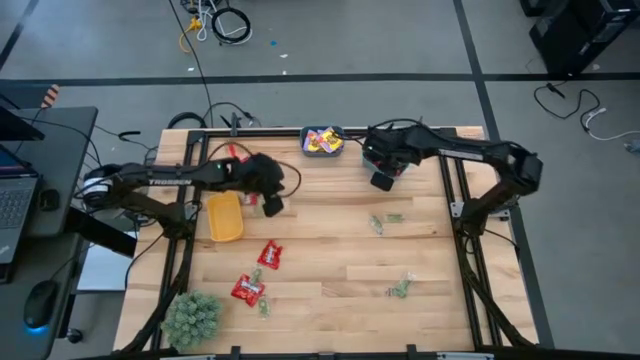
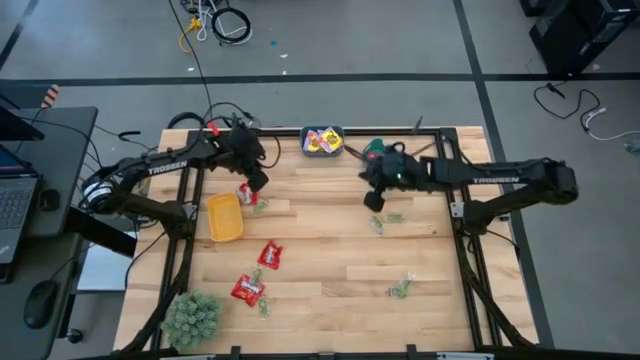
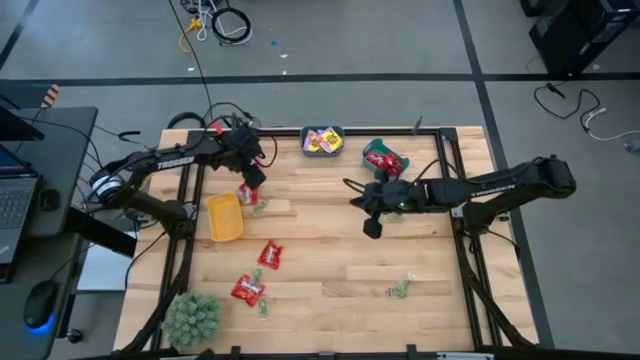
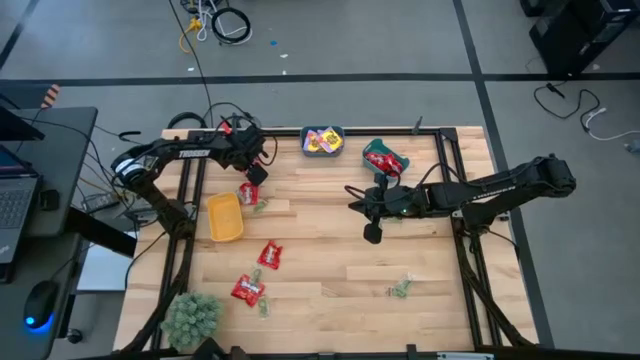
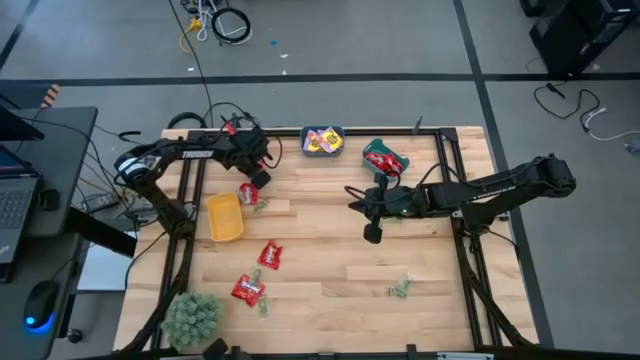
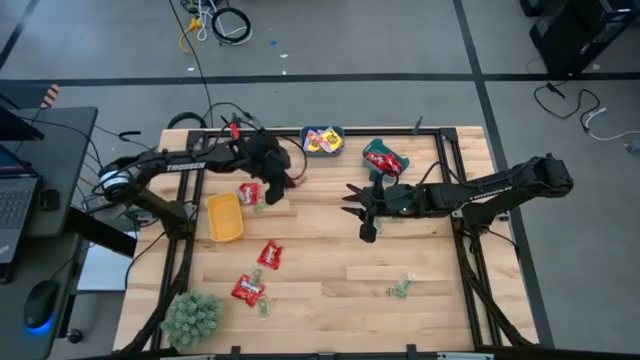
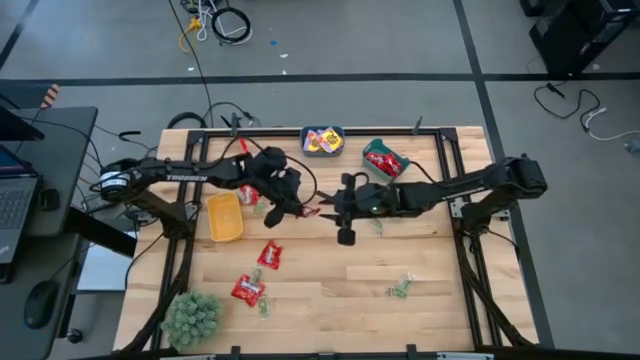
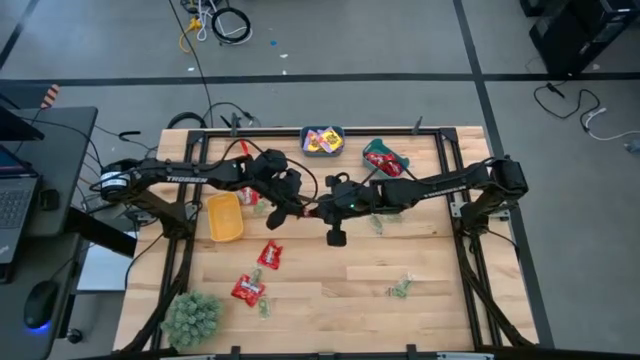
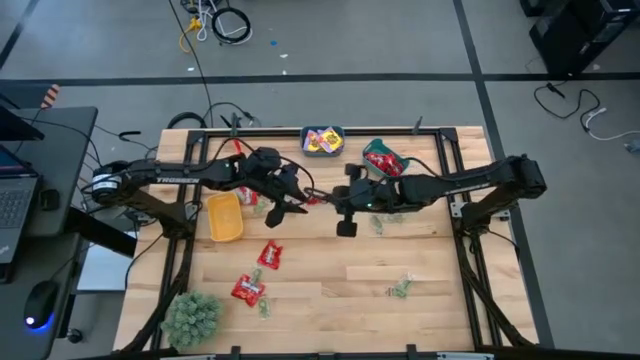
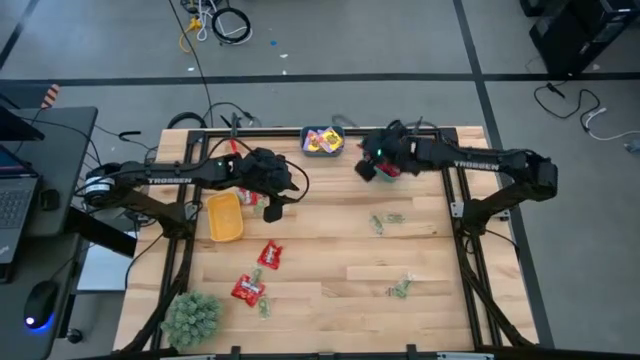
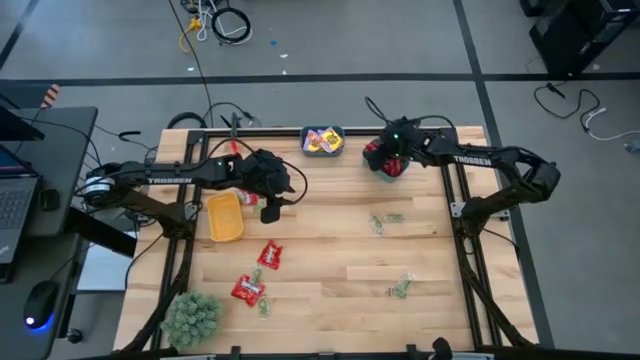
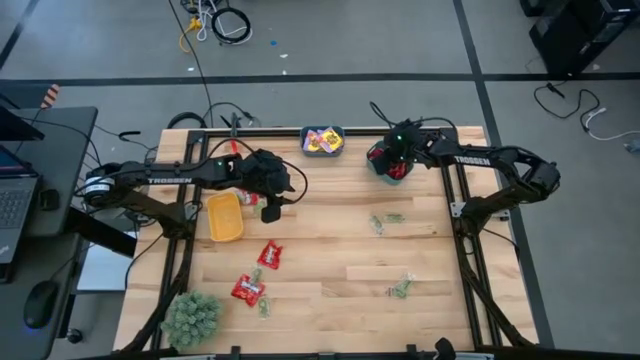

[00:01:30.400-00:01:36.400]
Task: Sort candy
Put the red candy into the green bin

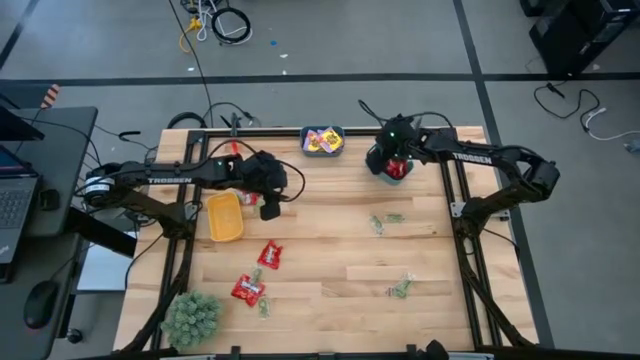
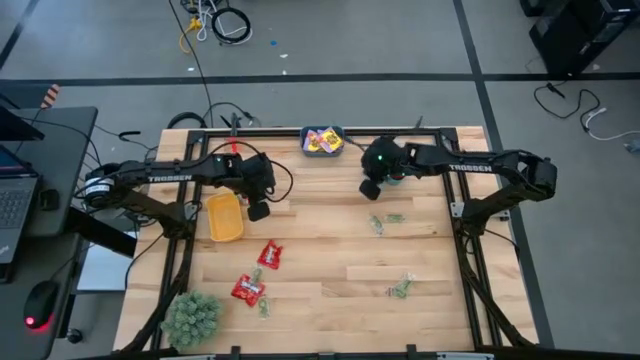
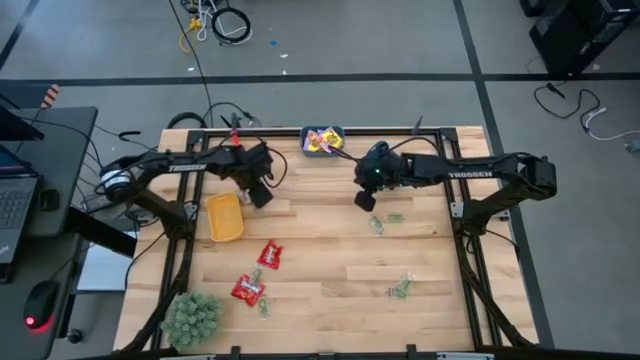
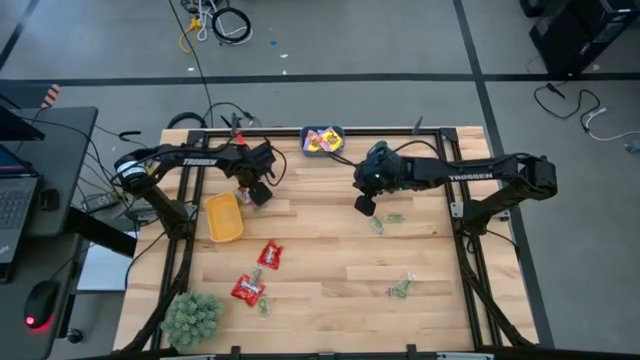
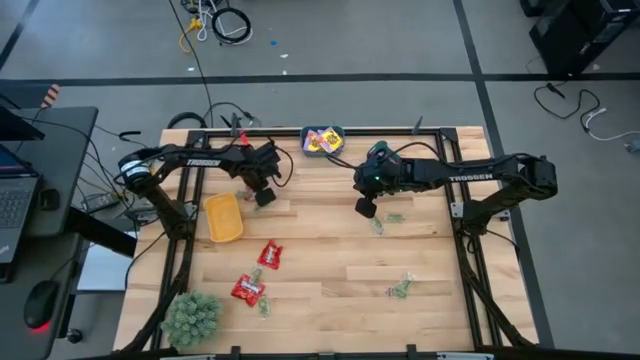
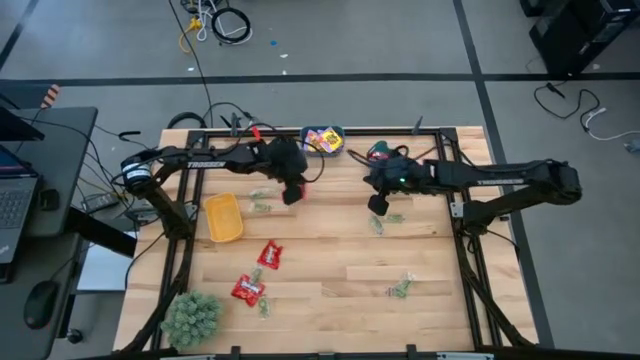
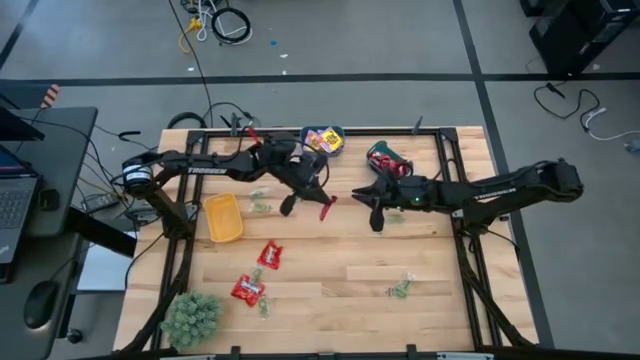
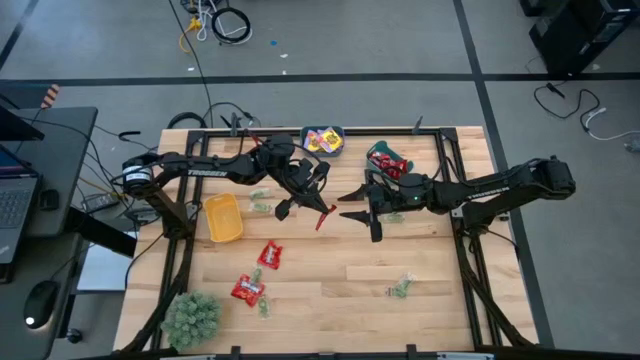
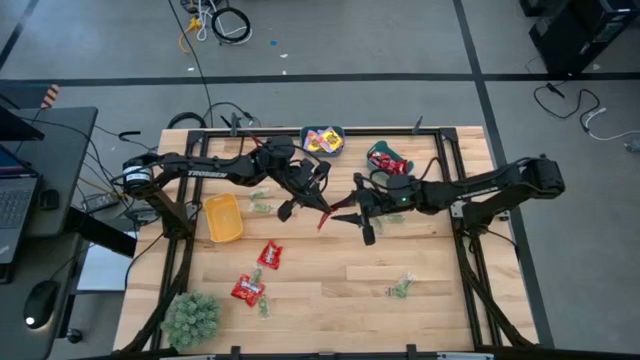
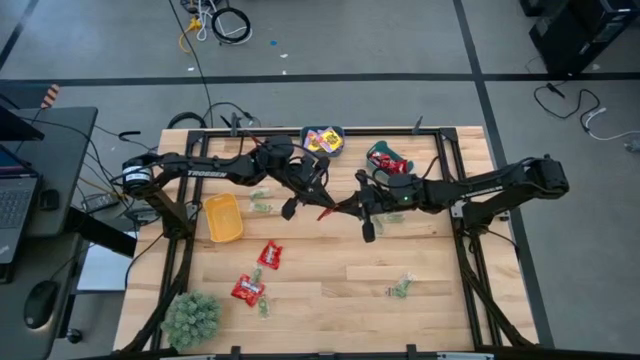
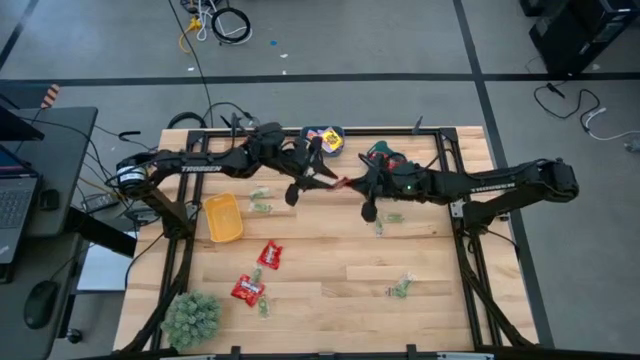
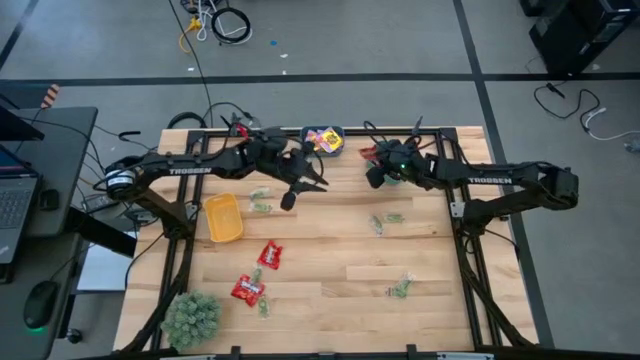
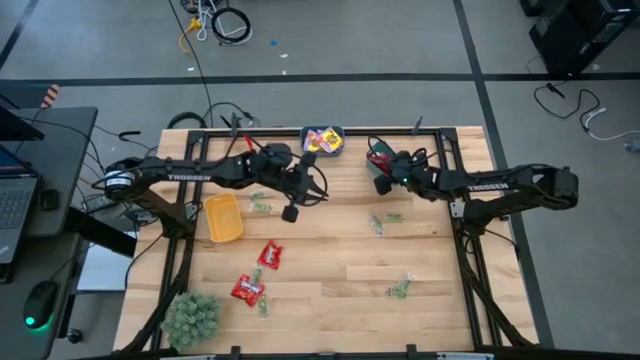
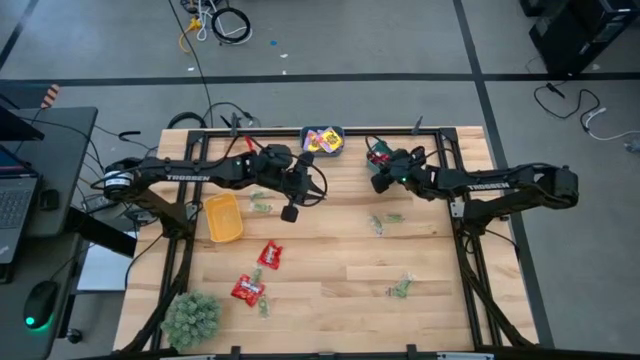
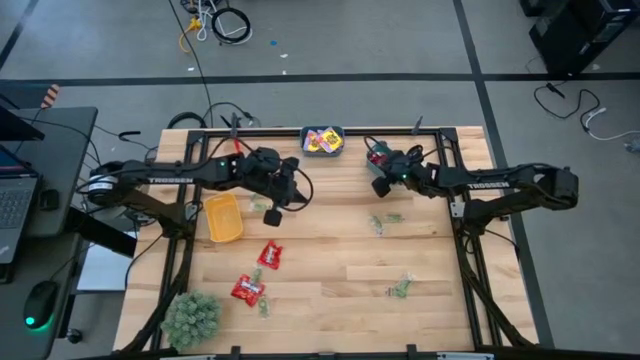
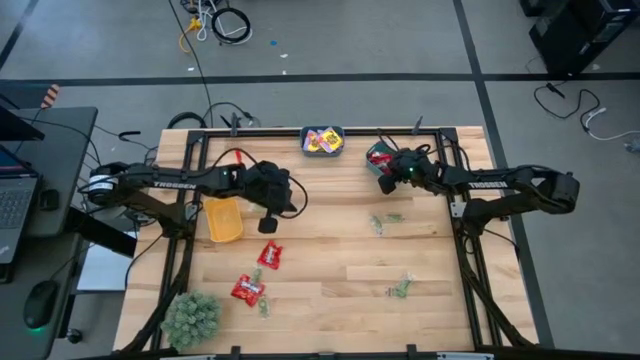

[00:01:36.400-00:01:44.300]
Put the red candy into the green bin

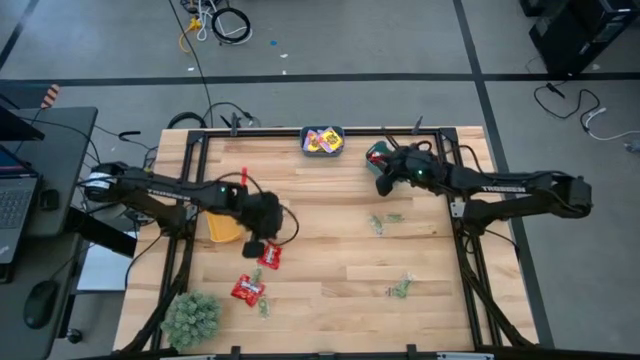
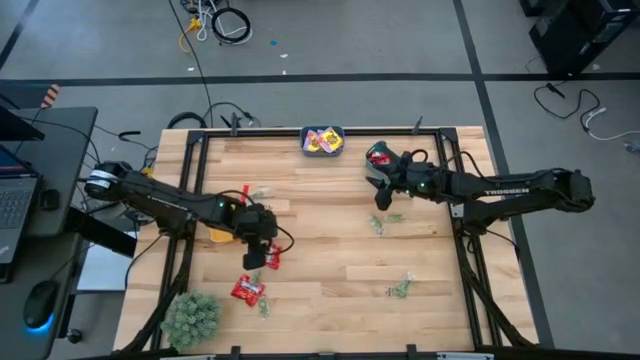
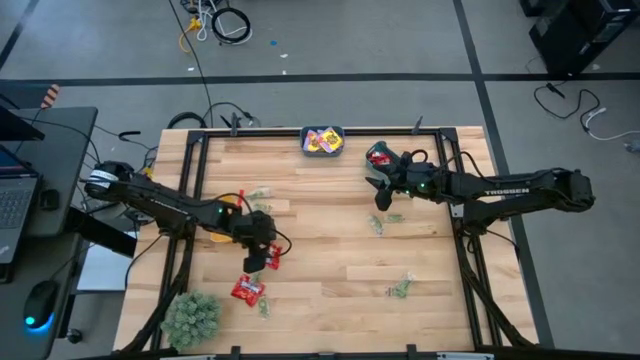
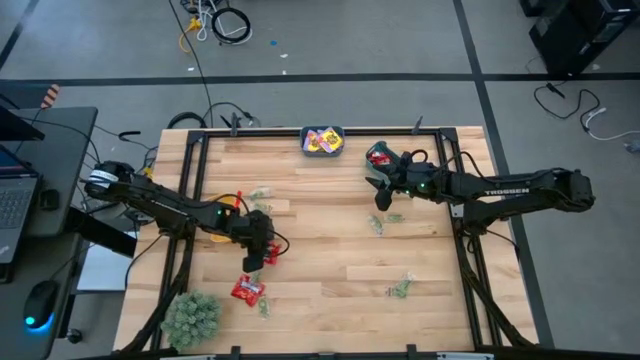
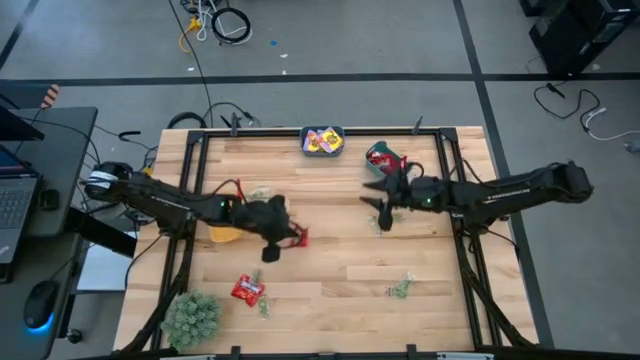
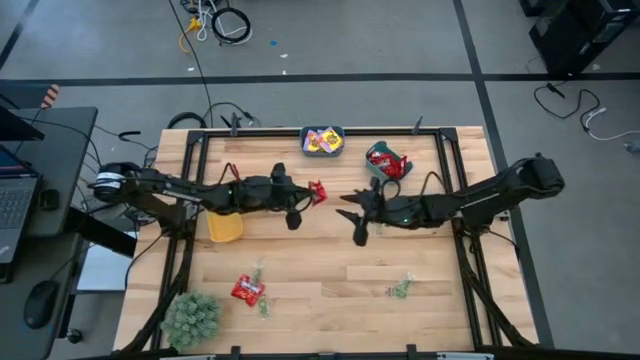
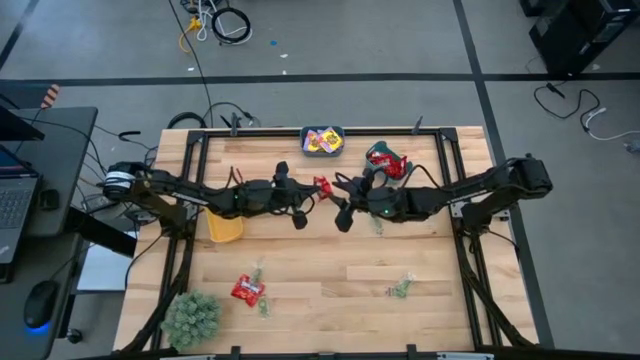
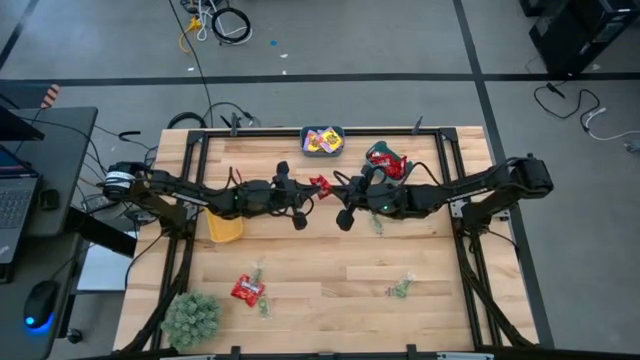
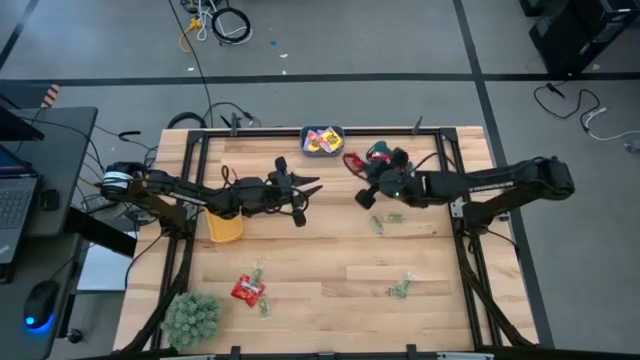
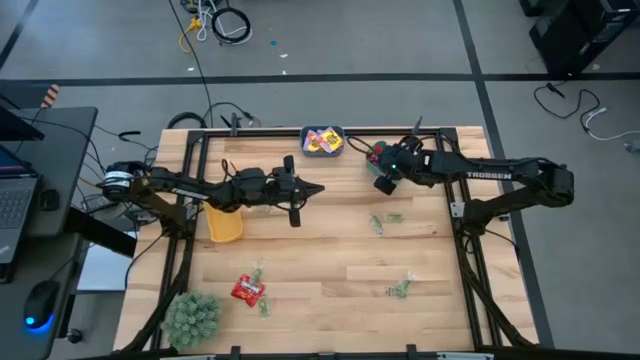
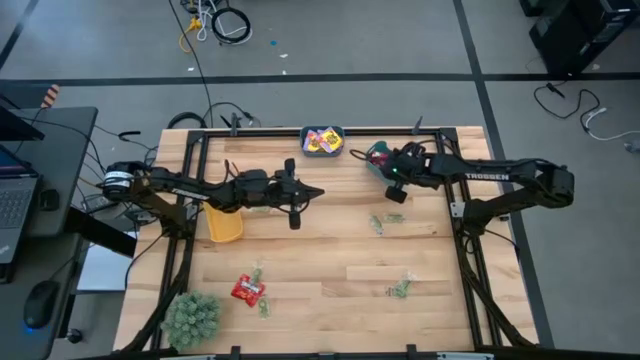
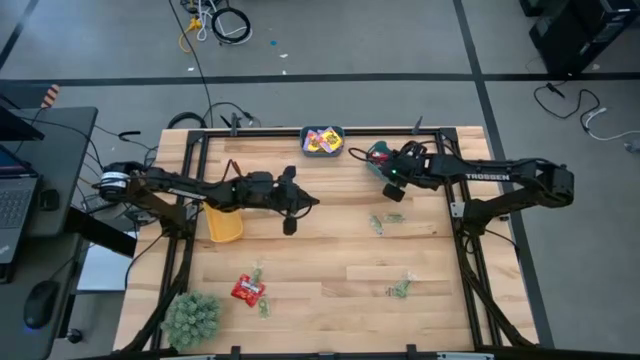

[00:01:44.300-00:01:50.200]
Put the red candy into the green bin

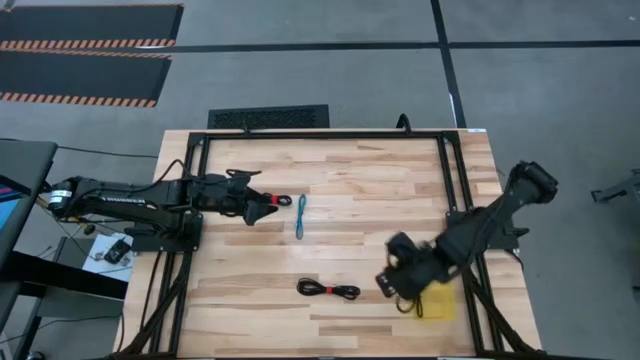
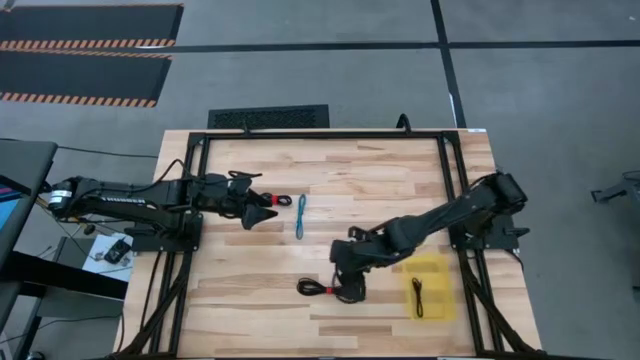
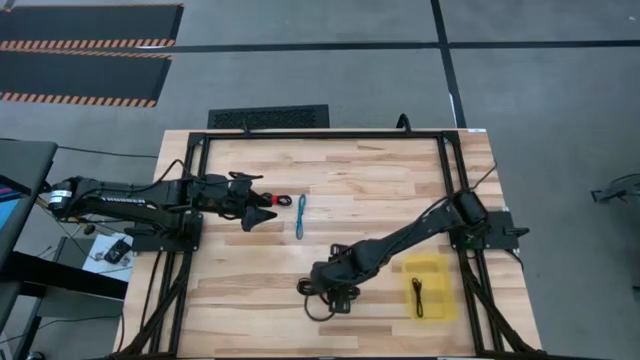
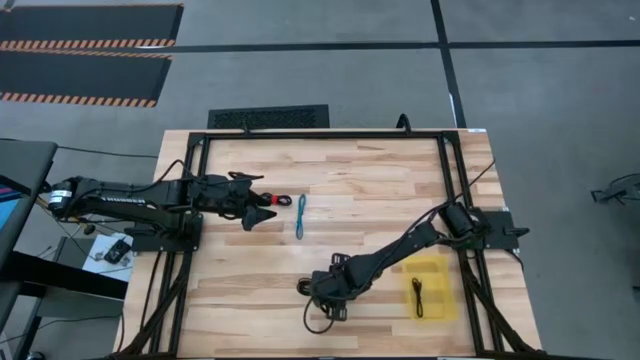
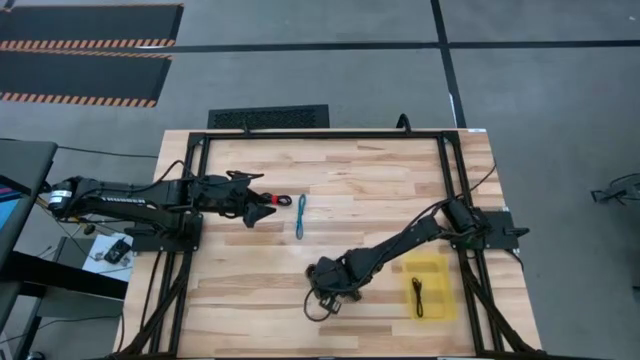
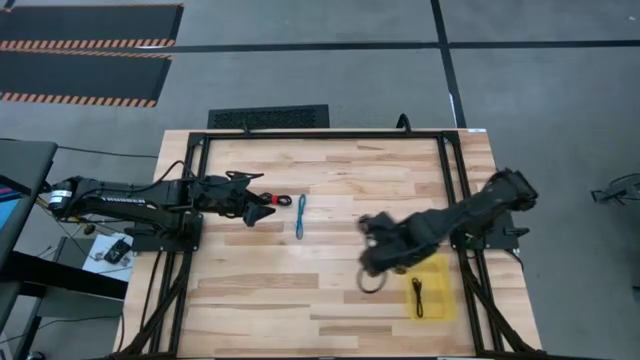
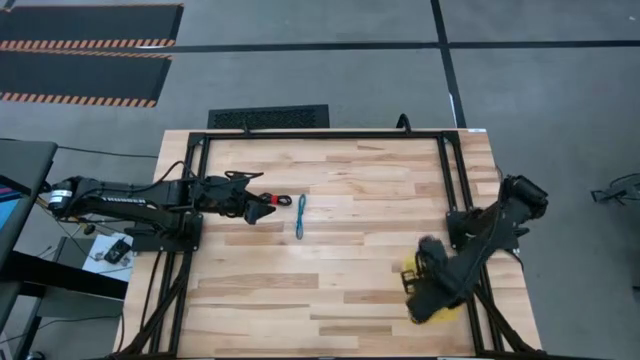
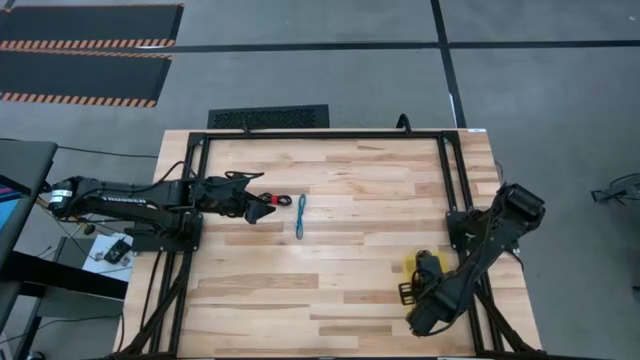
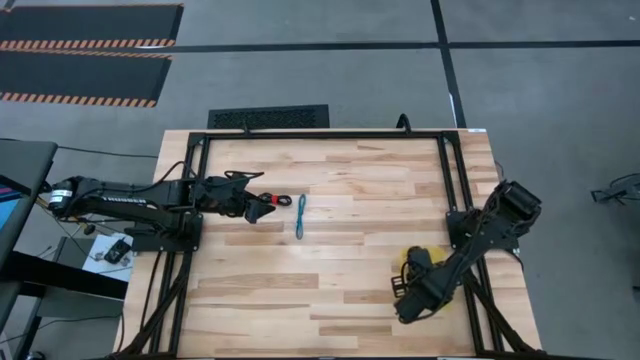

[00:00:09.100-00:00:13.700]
Task: Pick and place USB-C Cables
Put the bottom black charger cable into the yellow bin
